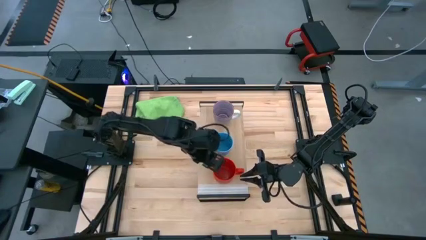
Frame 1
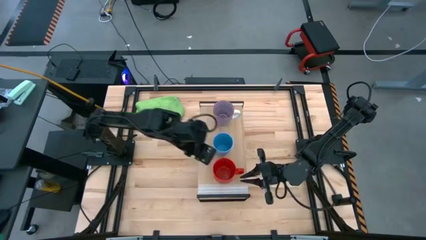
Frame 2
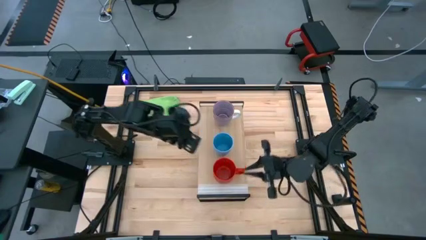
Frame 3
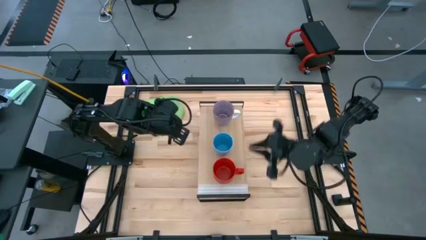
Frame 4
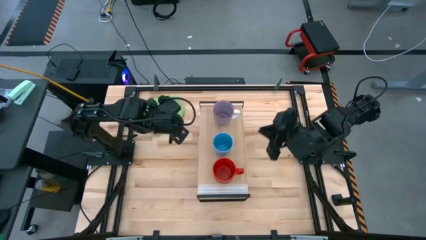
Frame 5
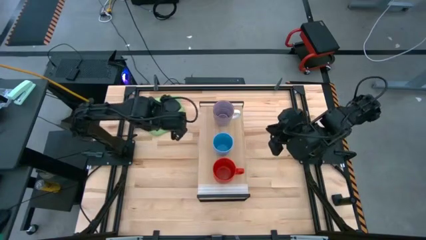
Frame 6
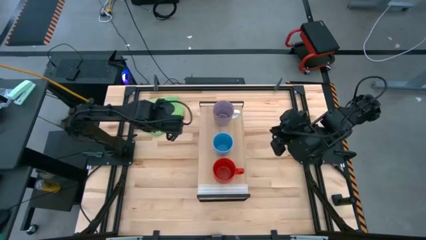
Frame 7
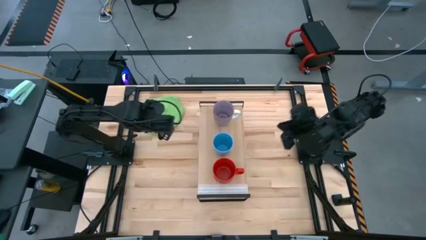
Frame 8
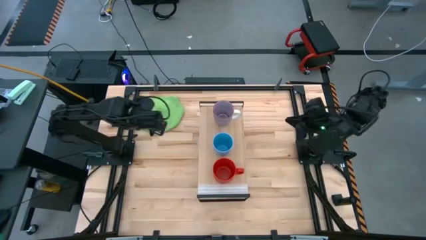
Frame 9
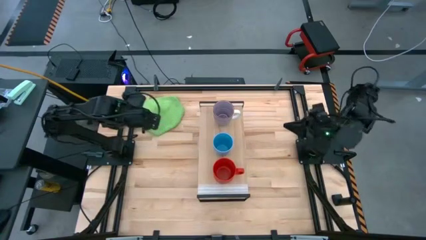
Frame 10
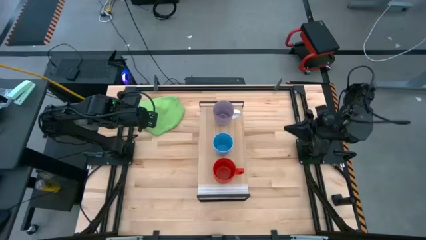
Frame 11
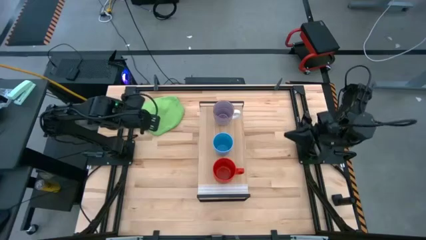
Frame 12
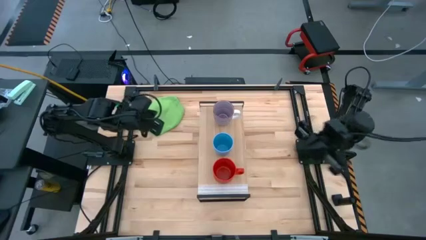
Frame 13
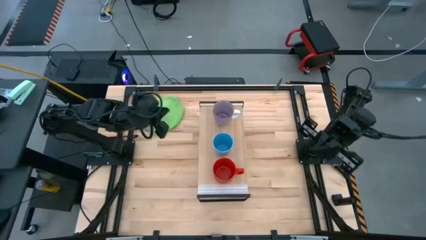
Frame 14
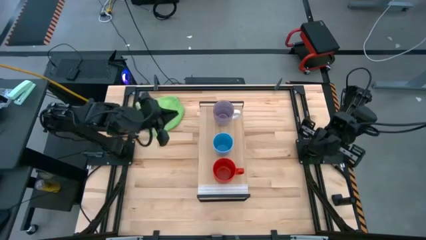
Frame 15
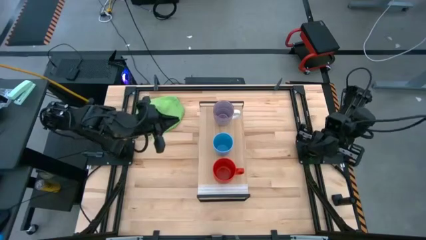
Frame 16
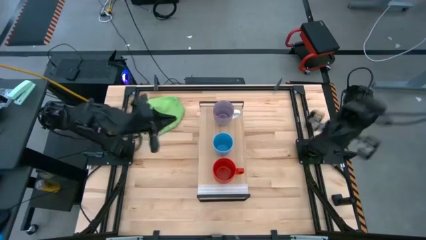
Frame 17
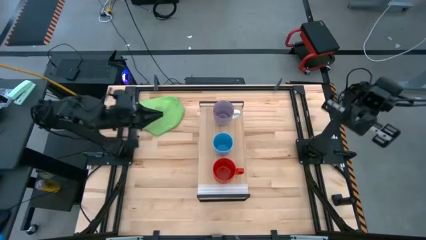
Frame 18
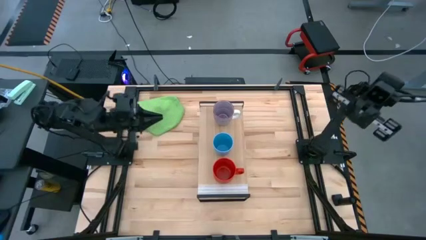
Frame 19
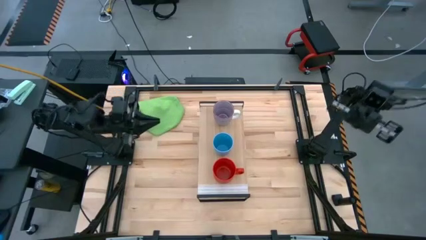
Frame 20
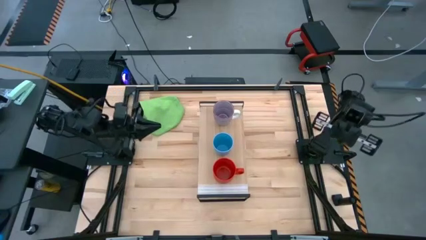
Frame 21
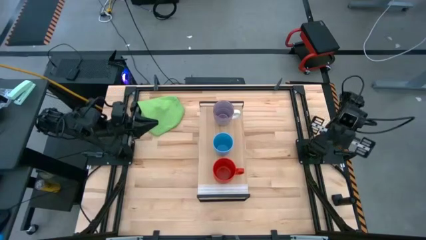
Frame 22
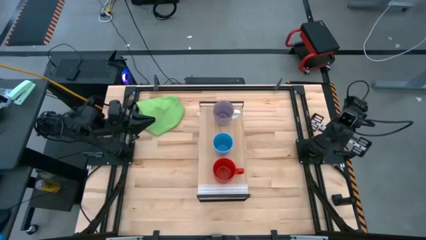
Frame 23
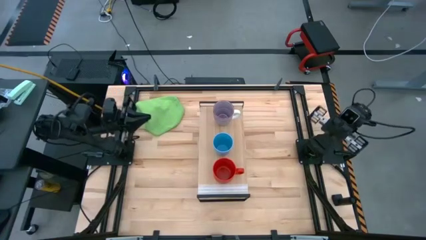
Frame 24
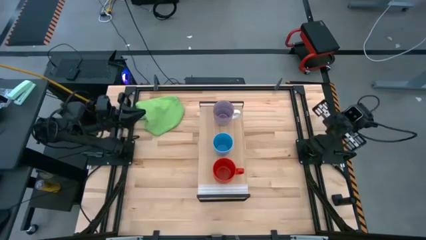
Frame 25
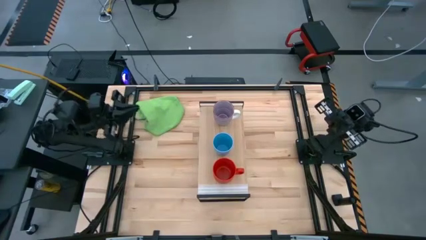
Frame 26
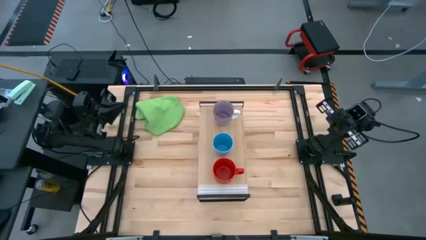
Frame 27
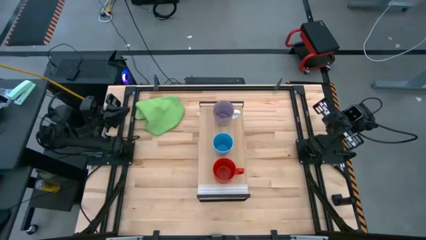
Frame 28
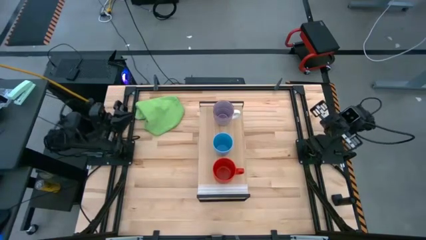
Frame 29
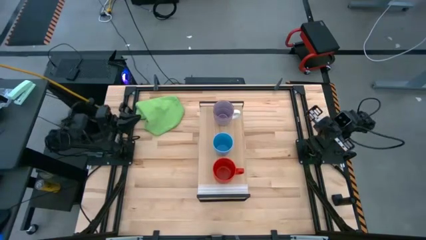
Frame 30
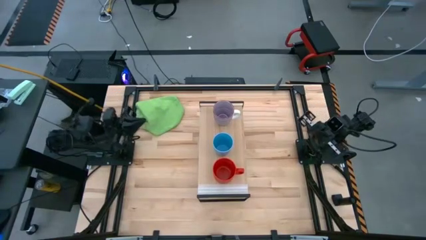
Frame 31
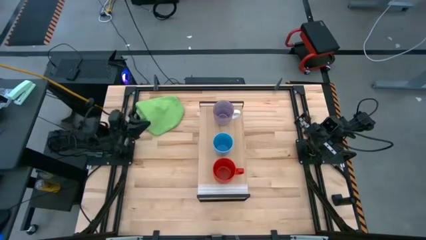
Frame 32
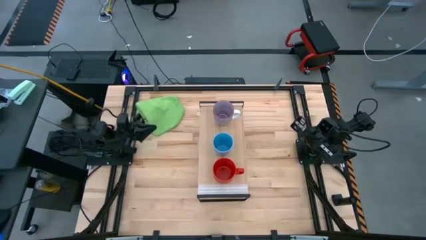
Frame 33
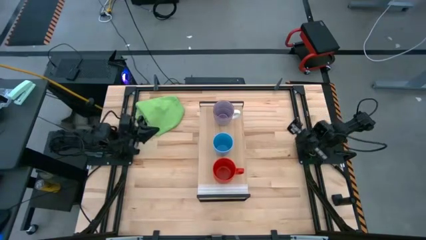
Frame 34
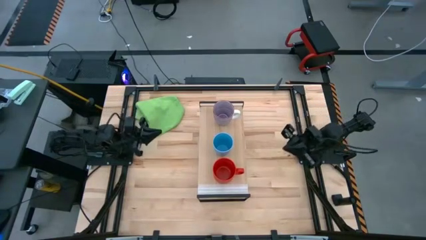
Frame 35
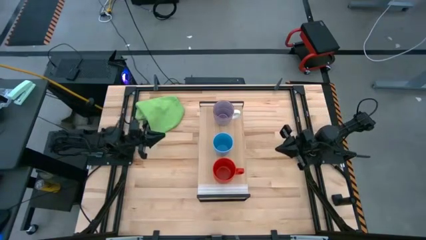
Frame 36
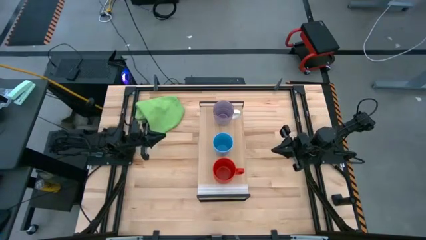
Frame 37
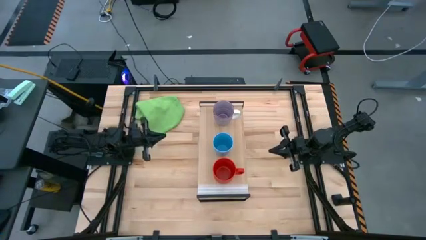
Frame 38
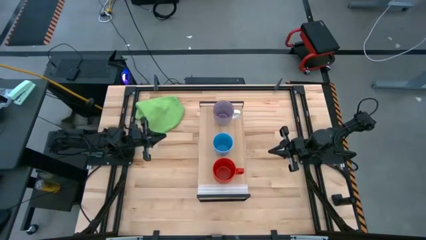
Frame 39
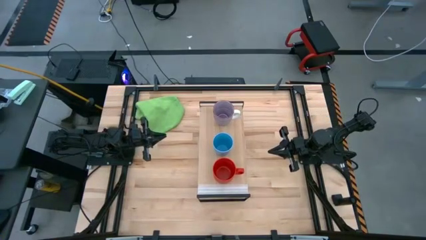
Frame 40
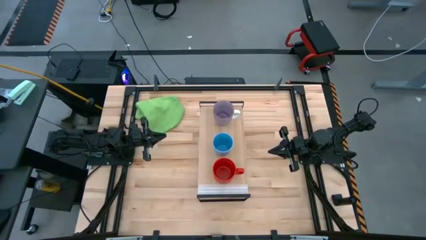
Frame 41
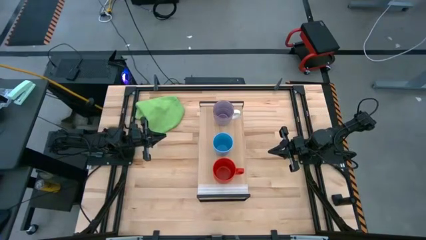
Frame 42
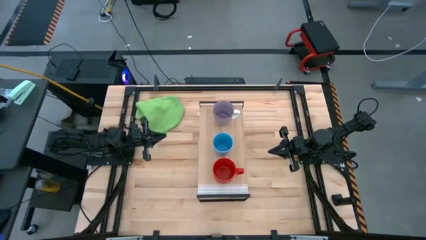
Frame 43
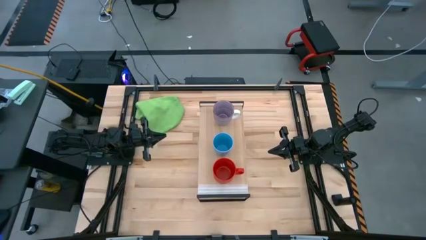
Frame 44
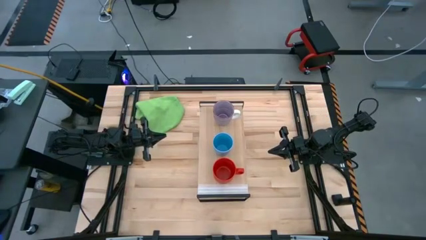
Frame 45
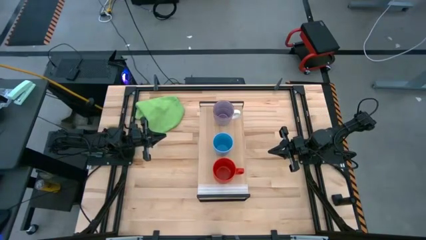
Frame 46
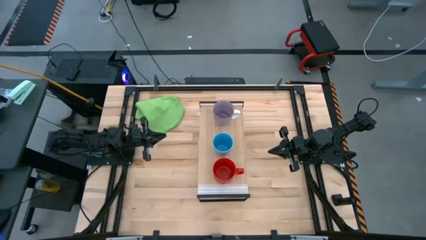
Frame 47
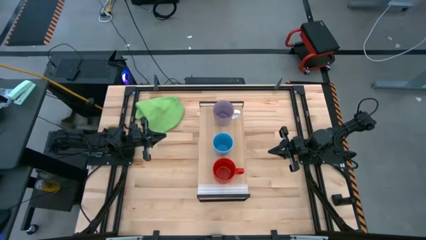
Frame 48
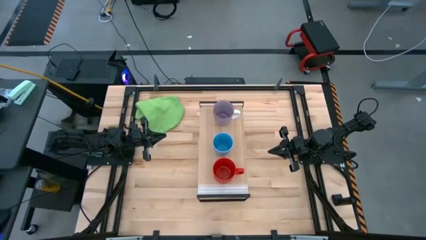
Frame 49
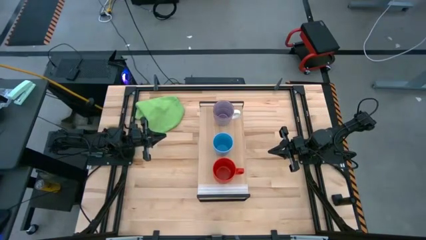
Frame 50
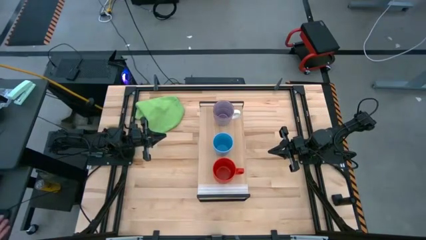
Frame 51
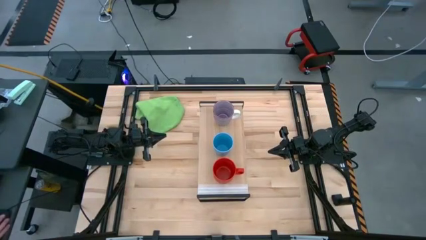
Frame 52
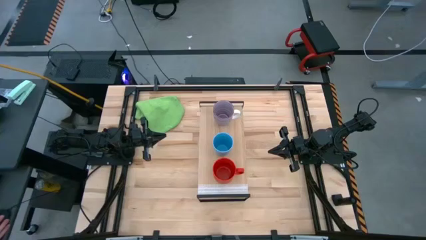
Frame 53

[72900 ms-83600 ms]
Task: Stack small to large cups/mugs on shelf
Return to Home Position
